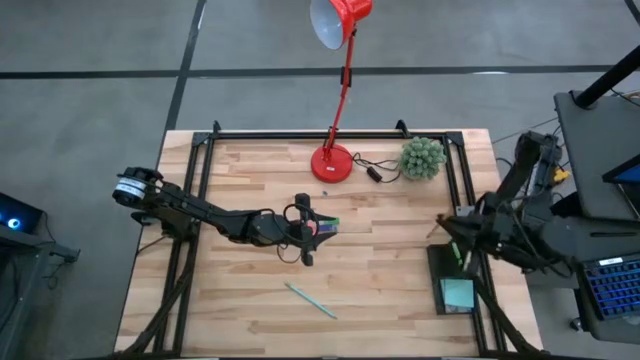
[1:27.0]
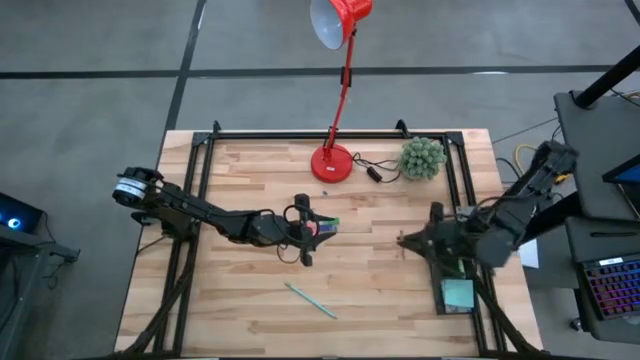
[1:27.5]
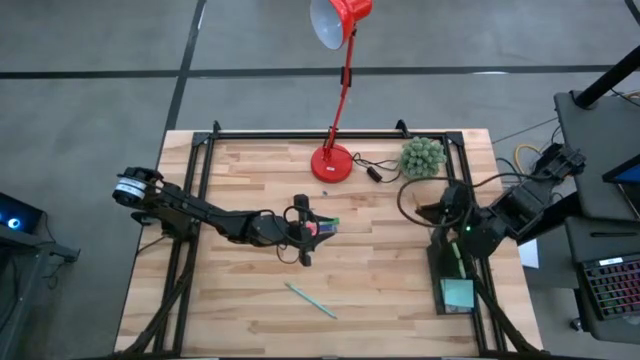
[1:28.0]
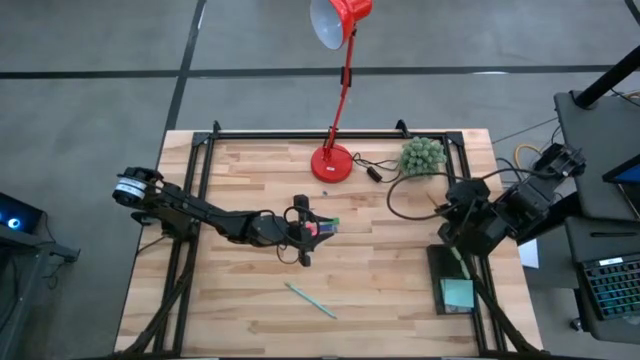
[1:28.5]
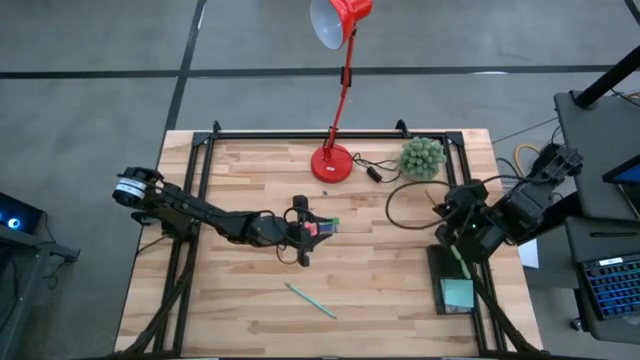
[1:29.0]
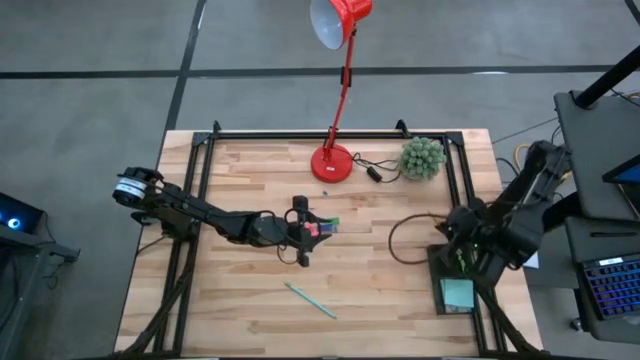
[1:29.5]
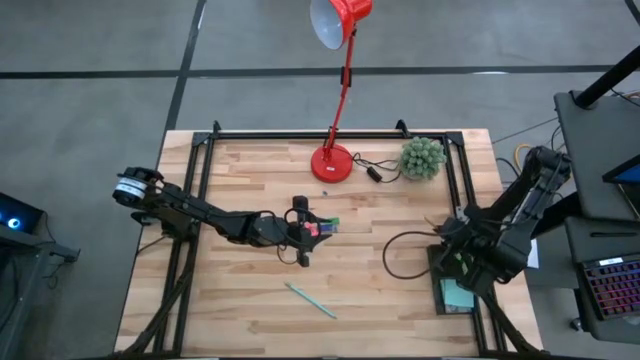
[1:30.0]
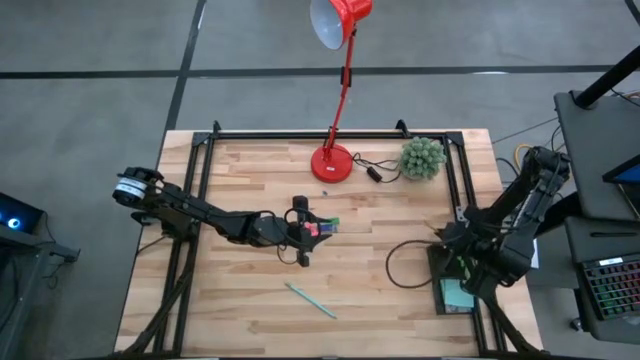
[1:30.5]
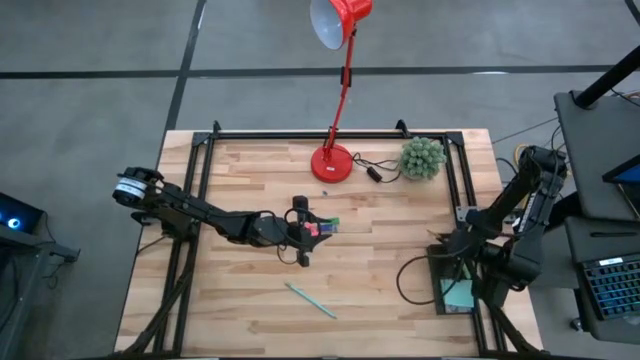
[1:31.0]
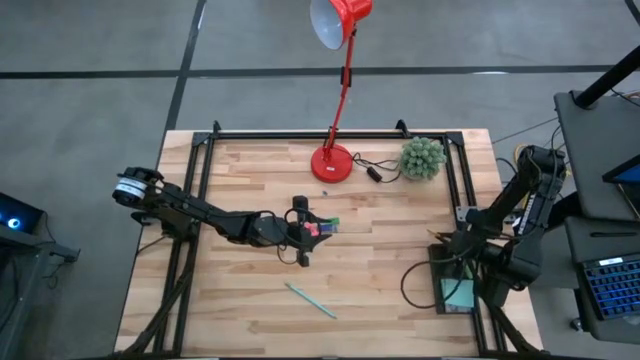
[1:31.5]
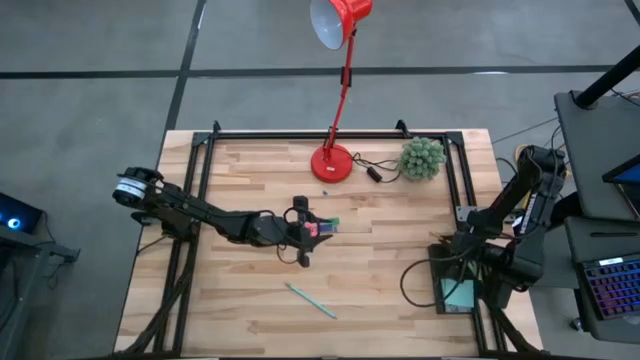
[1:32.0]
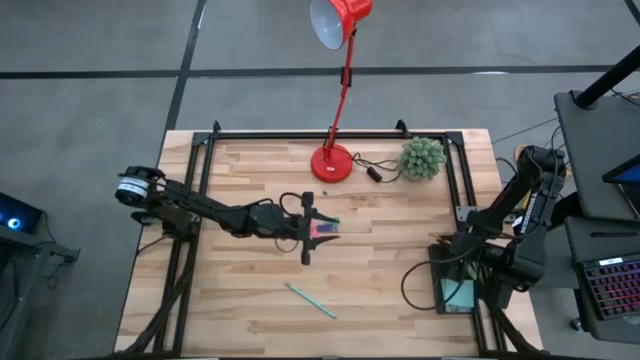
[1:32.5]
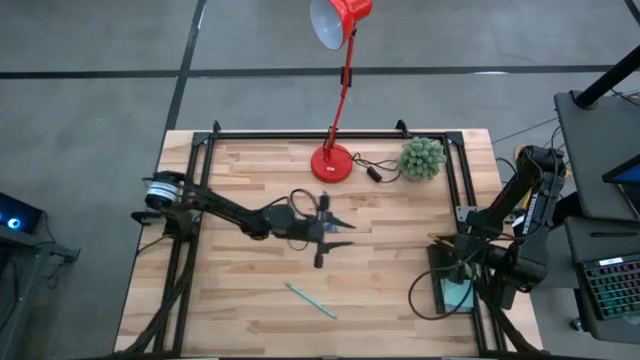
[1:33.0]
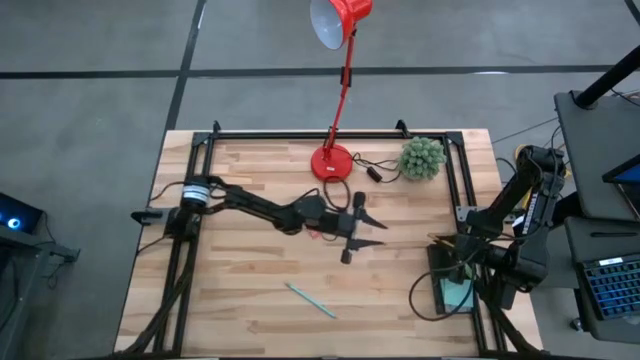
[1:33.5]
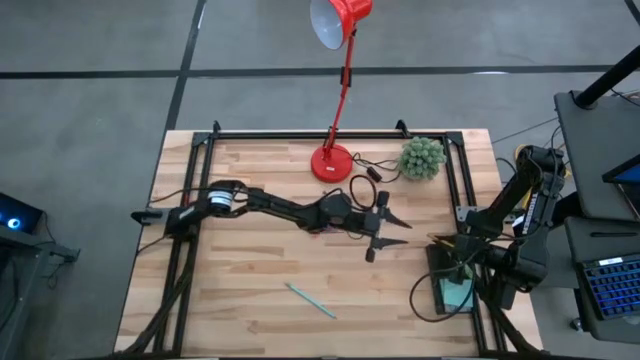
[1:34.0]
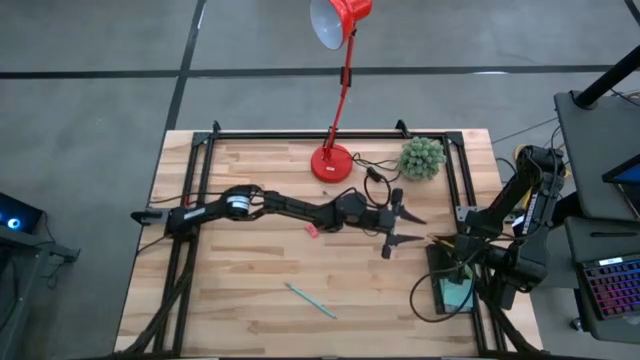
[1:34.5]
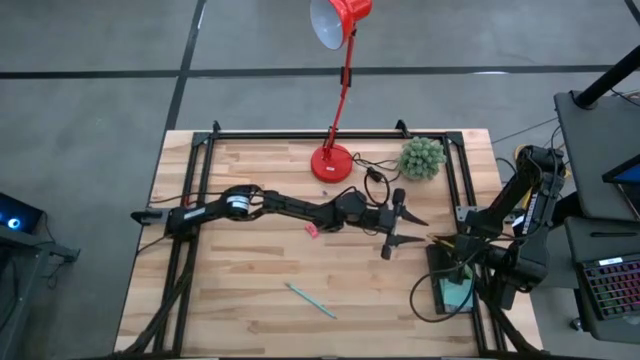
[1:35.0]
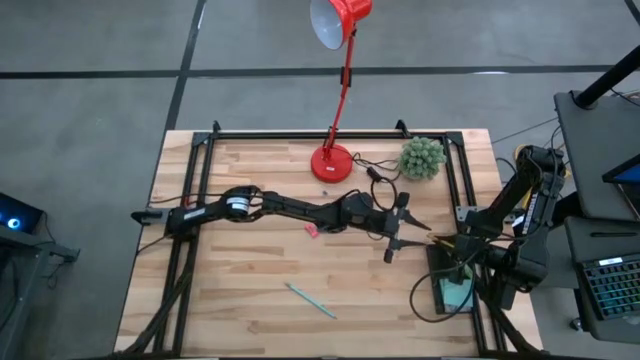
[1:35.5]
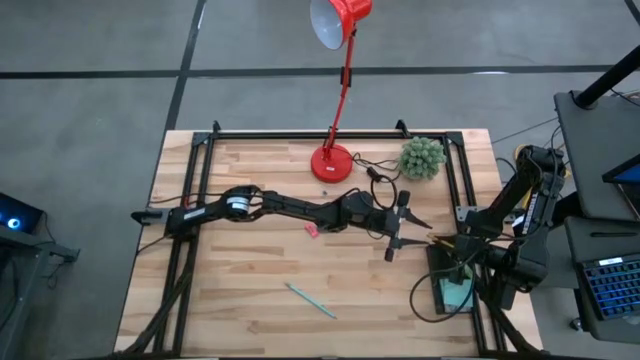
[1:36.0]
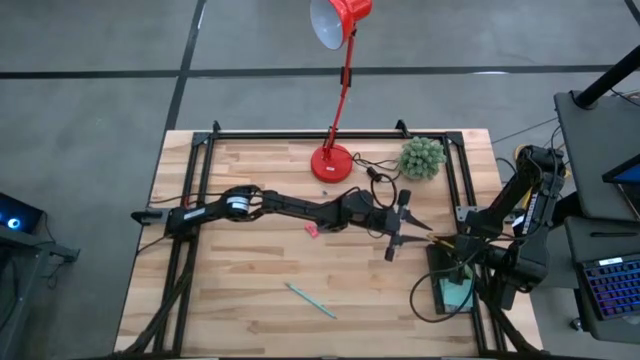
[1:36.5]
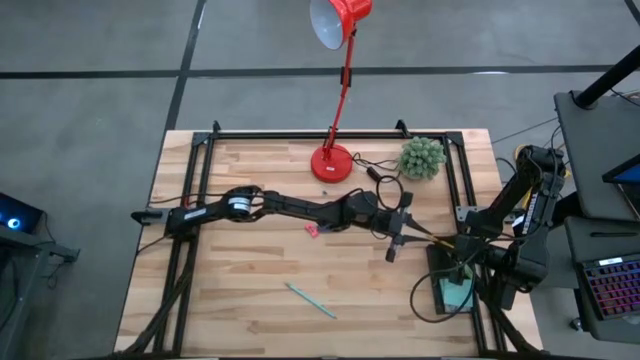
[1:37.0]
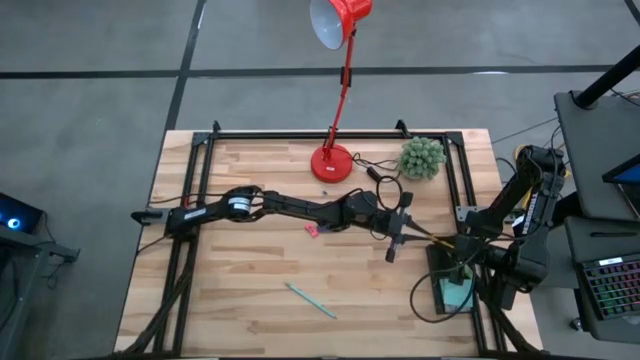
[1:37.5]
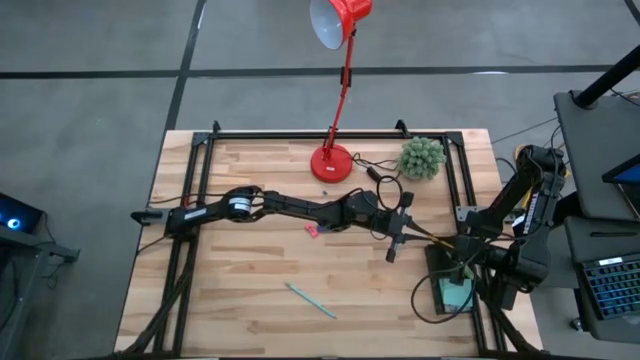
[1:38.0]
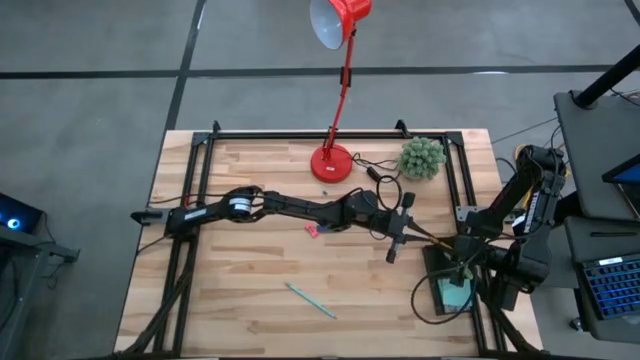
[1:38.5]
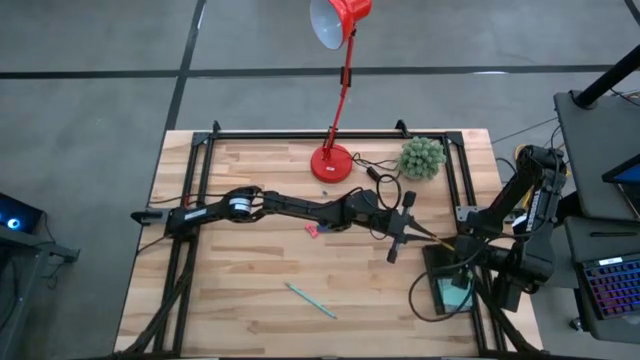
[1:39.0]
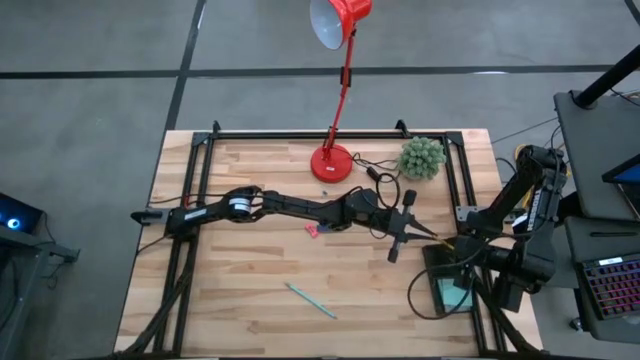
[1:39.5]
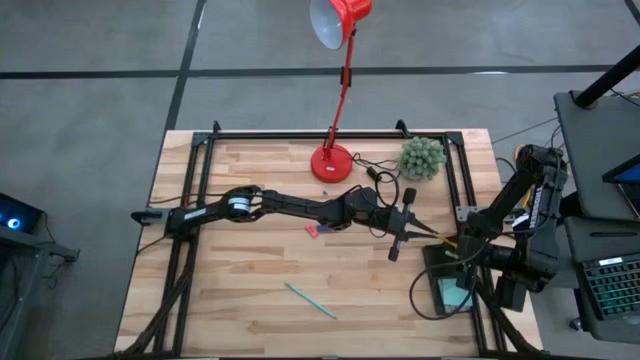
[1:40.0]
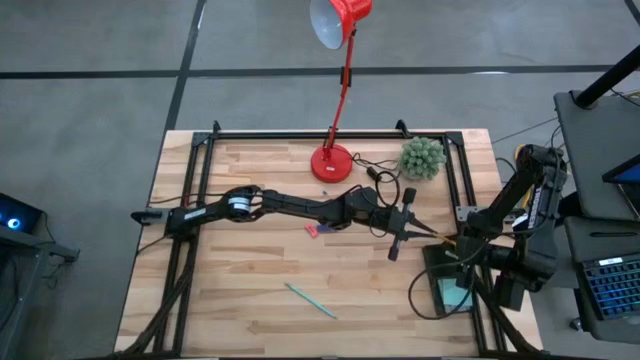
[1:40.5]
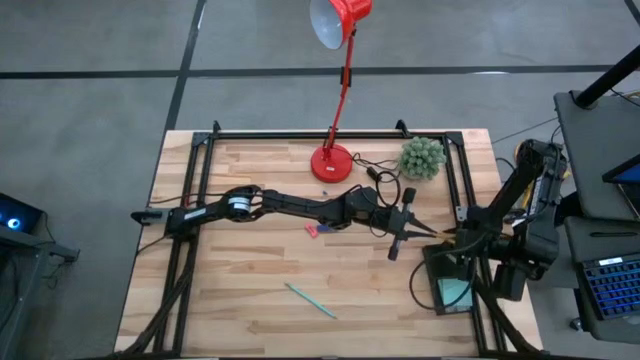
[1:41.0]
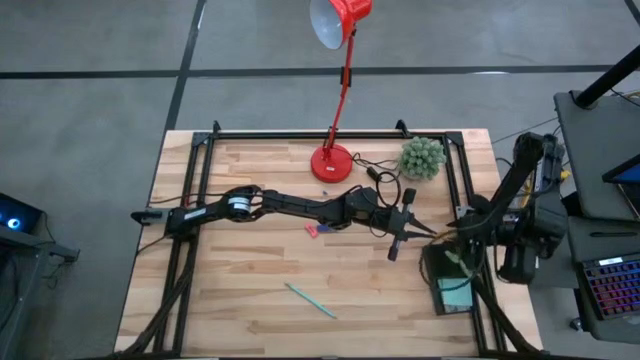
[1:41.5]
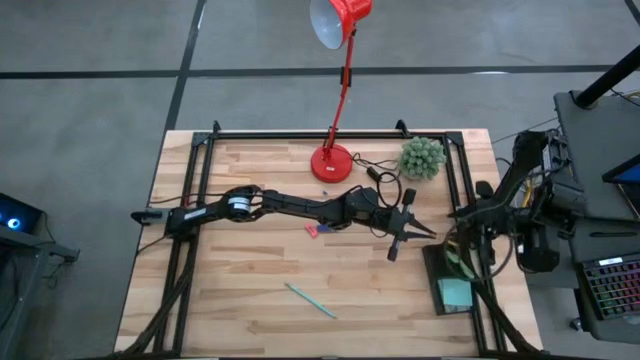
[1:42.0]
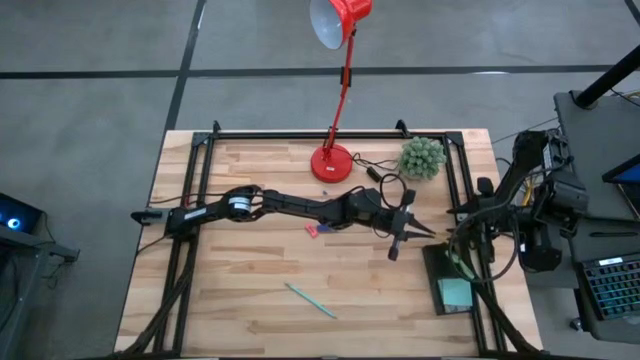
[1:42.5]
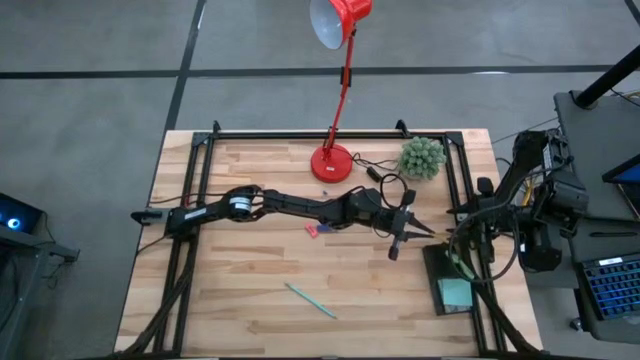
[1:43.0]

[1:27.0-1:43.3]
Task: Pick and place office supplies into organizer
Put the yellow pencil into the black desk organizer

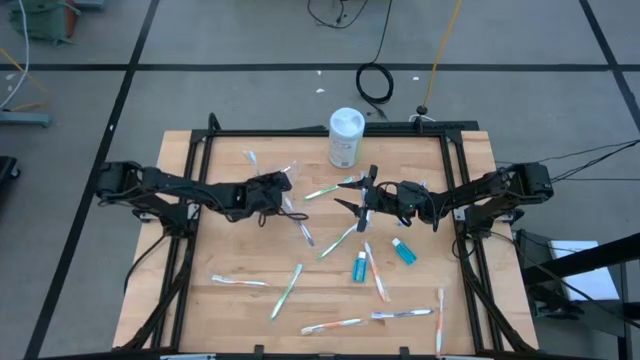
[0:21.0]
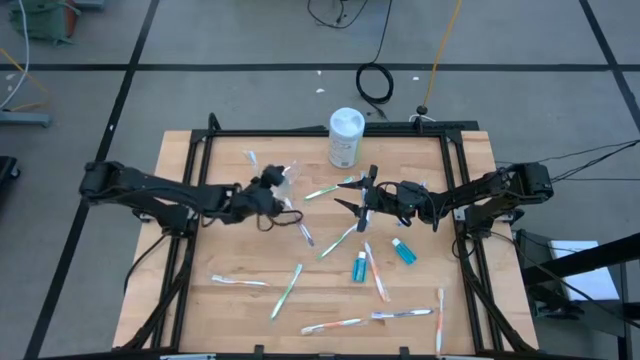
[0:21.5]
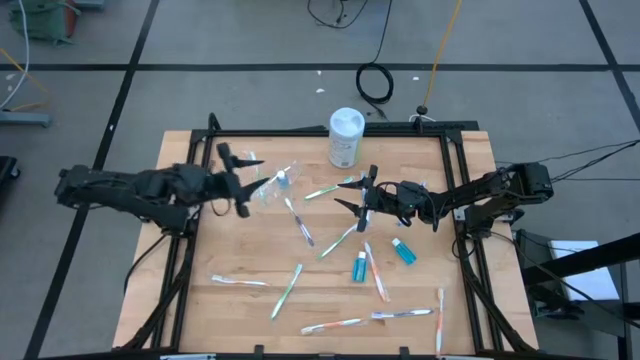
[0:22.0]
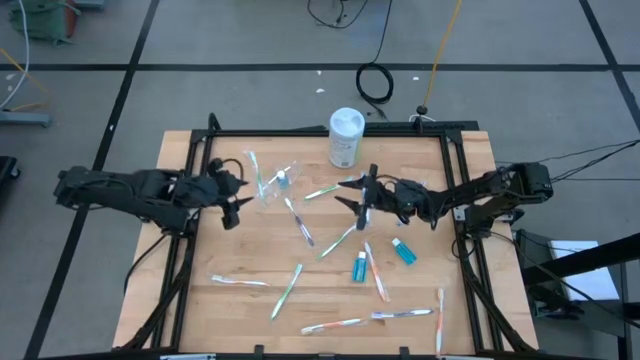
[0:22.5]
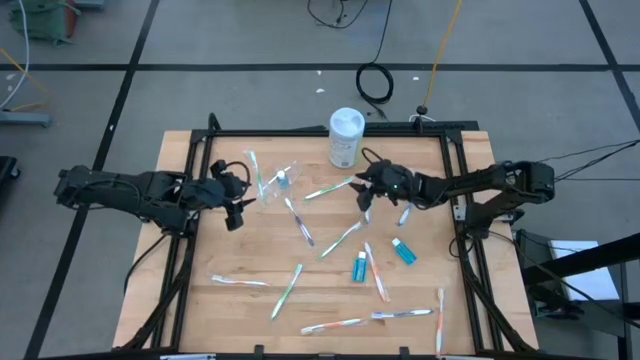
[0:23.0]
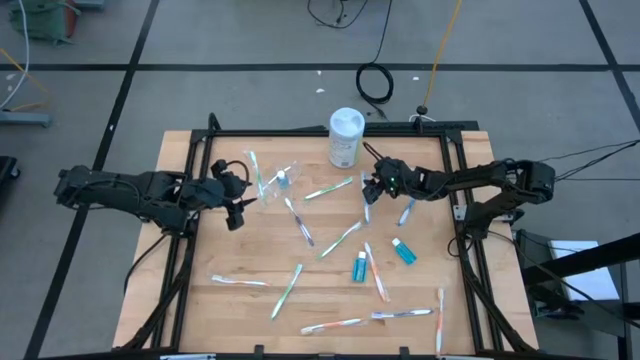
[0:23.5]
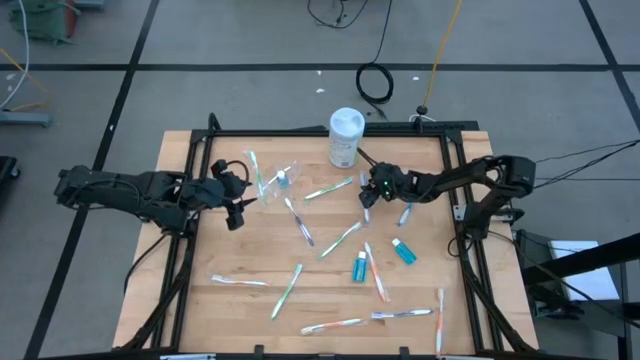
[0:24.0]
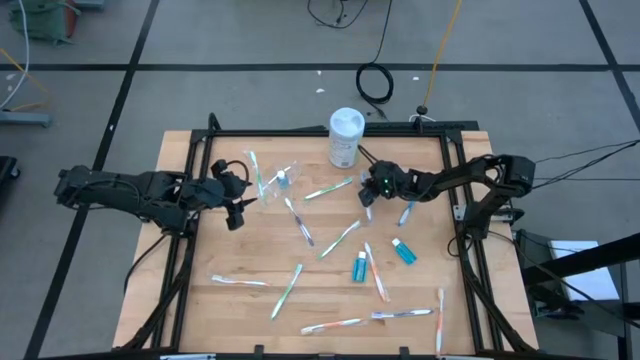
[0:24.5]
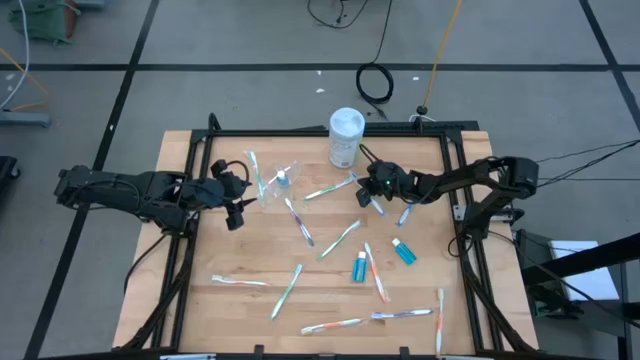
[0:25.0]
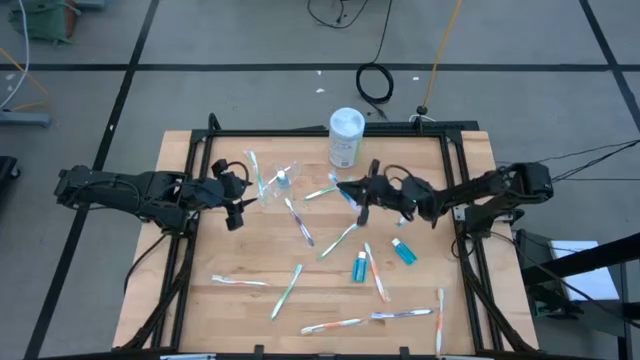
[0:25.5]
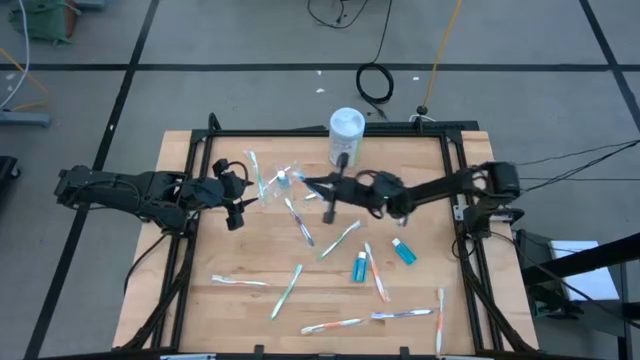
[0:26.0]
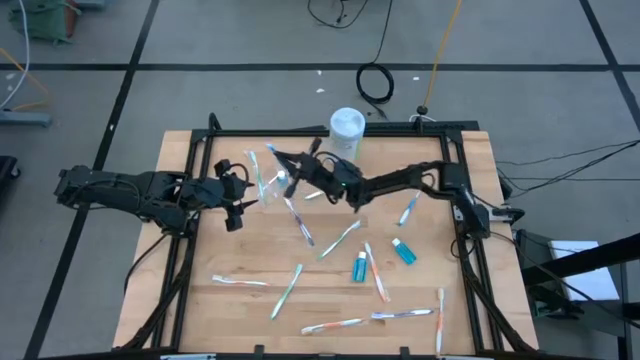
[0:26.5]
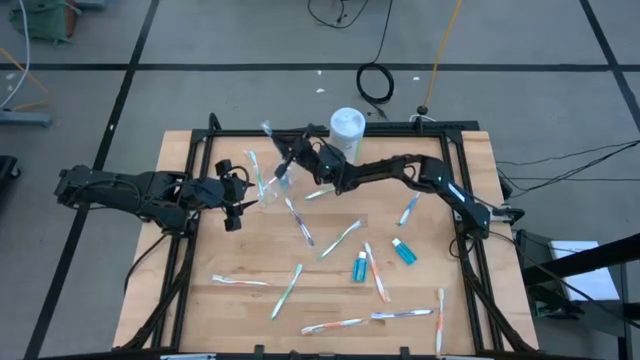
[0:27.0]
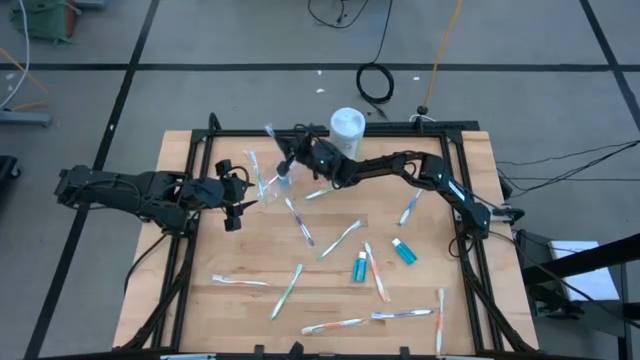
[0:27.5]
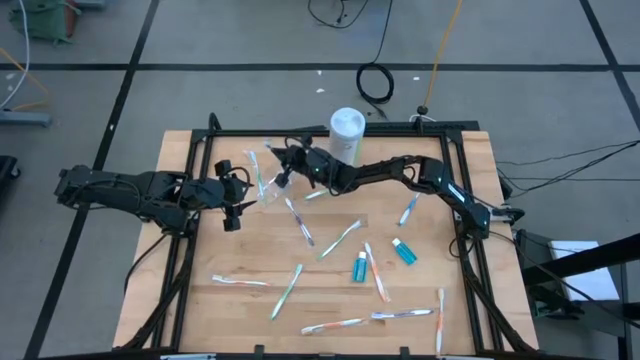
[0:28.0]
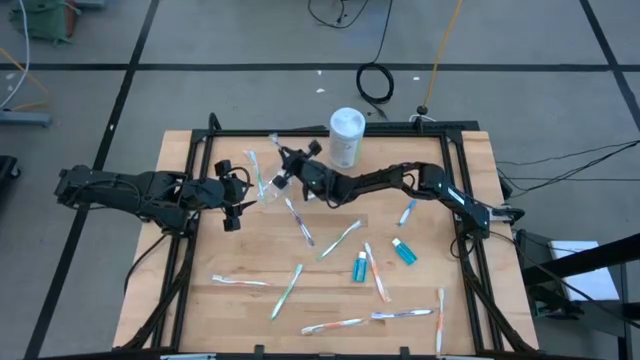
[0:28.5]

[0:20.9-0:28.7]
Task: Pick & Place toothbrushing station
Put the blue toothbrush into the right of the transparent organizer
